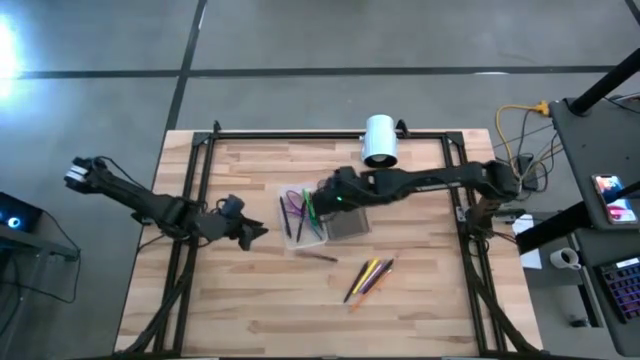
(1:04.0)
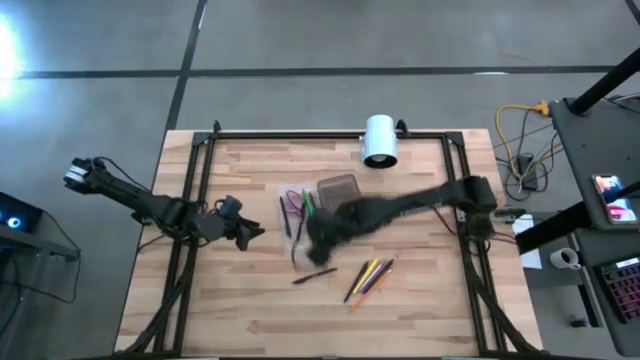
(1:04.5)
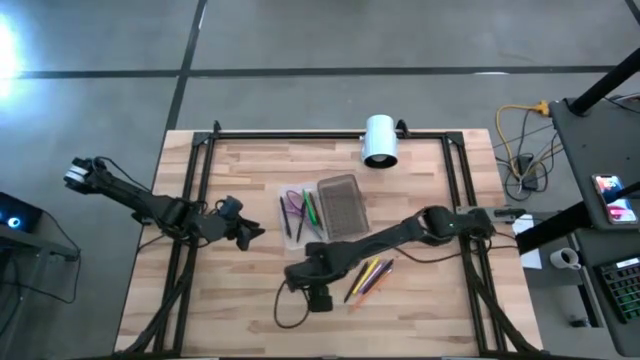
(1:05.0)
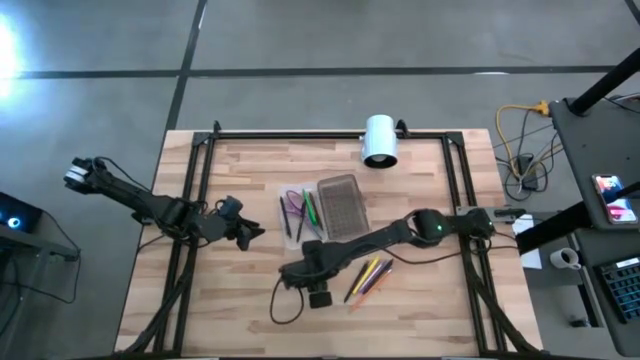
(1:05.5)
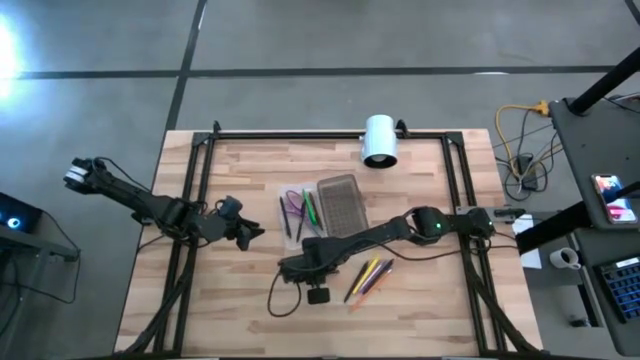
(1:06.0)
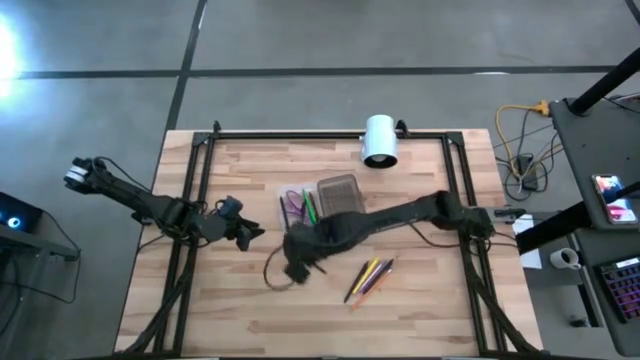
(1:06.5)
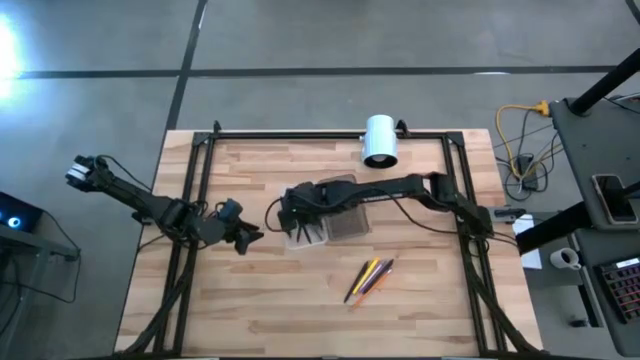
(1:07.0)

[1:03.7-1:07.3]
Task: Pick & place school supplies into a supply box
Put the black pen into the black supply box

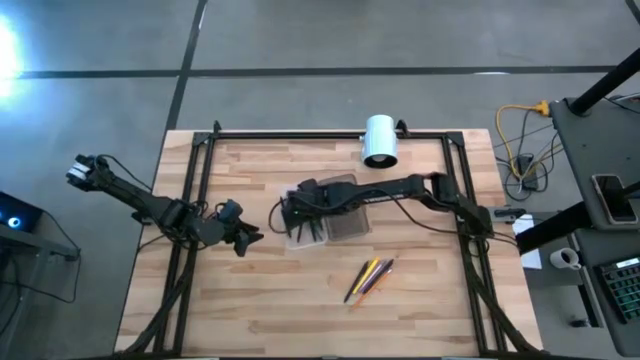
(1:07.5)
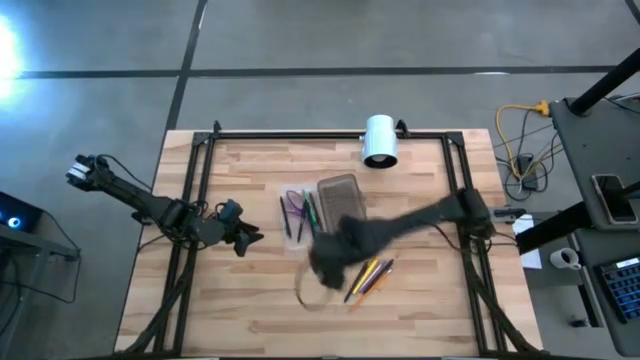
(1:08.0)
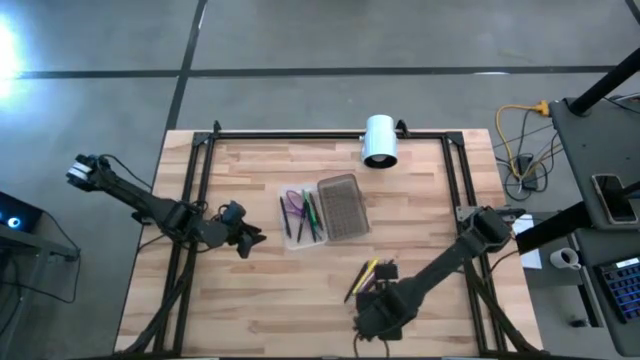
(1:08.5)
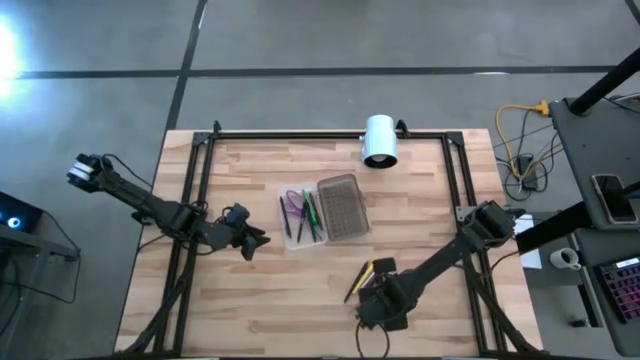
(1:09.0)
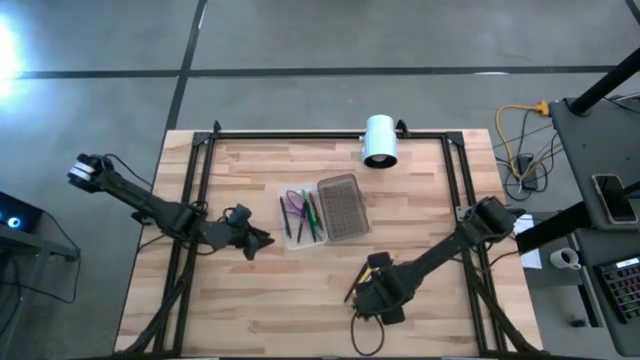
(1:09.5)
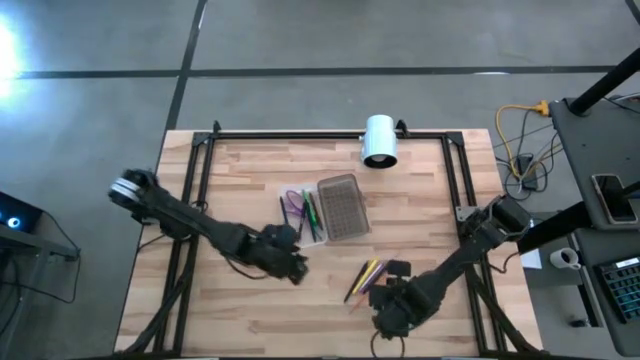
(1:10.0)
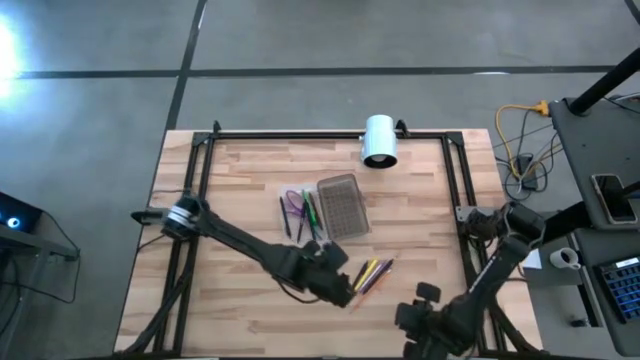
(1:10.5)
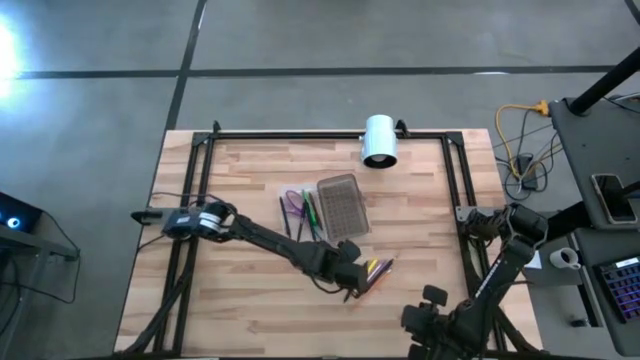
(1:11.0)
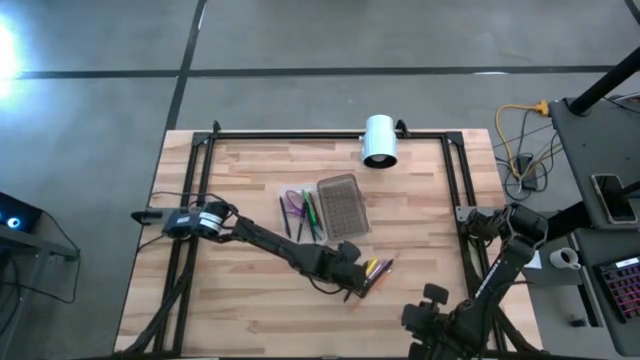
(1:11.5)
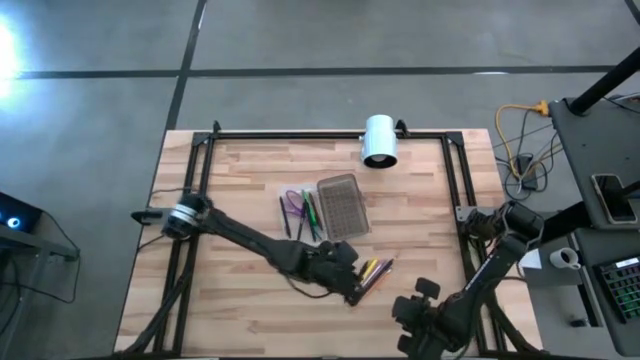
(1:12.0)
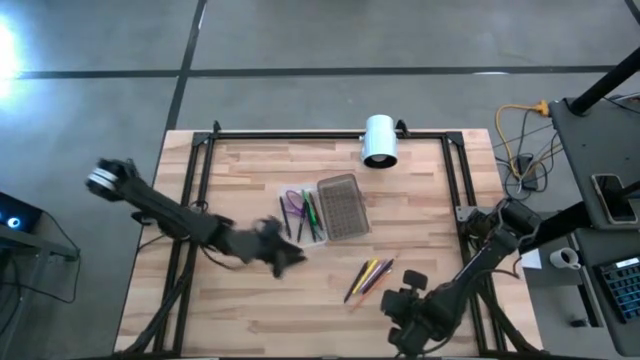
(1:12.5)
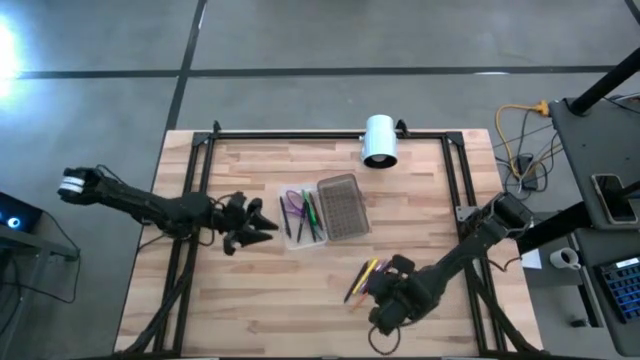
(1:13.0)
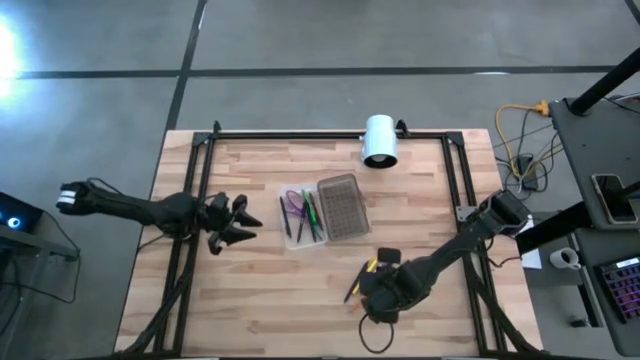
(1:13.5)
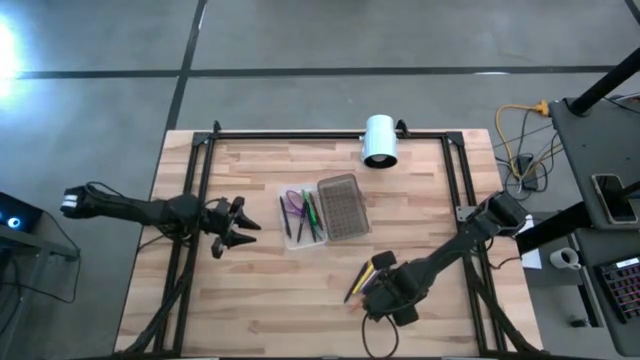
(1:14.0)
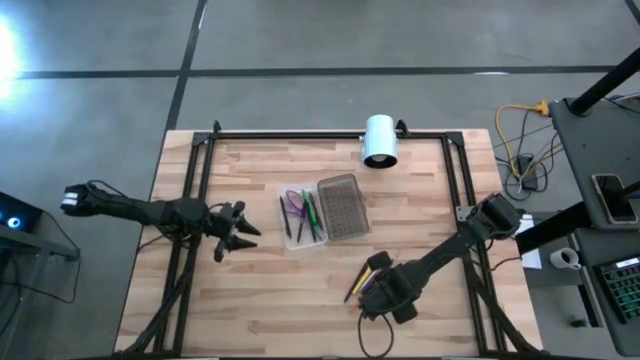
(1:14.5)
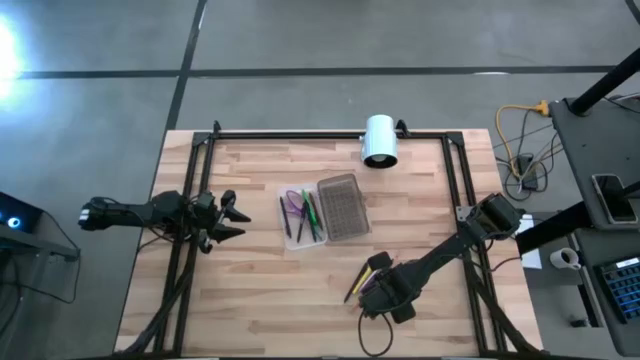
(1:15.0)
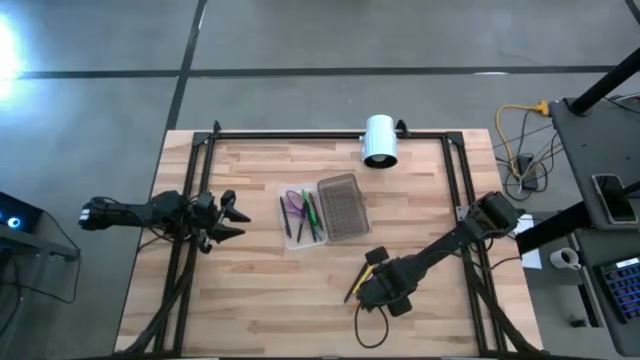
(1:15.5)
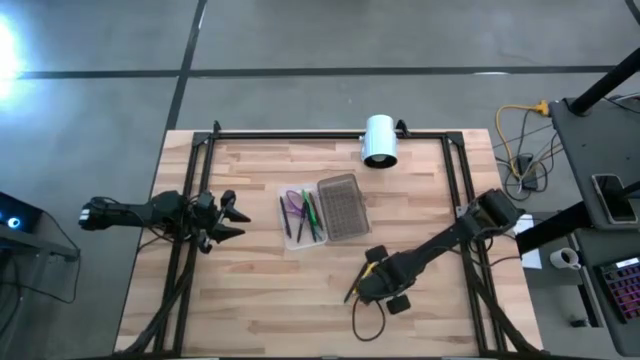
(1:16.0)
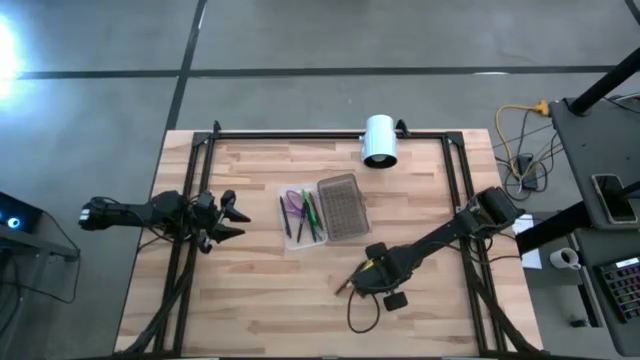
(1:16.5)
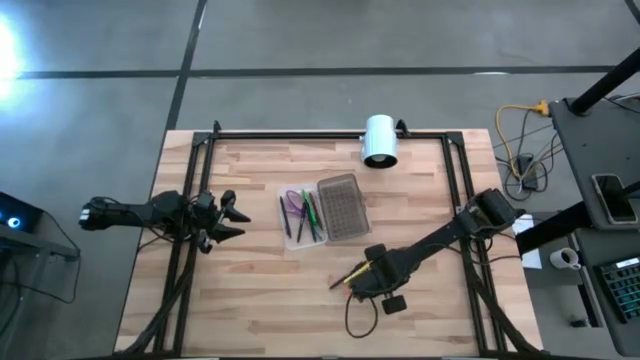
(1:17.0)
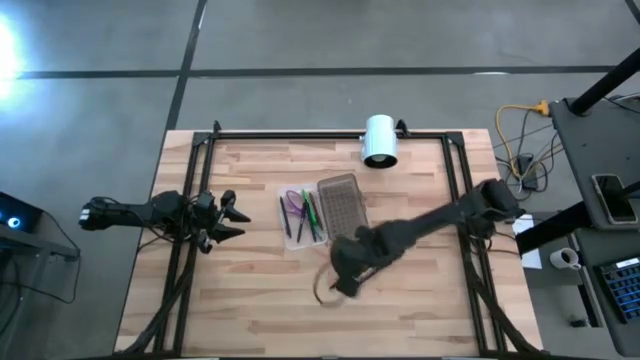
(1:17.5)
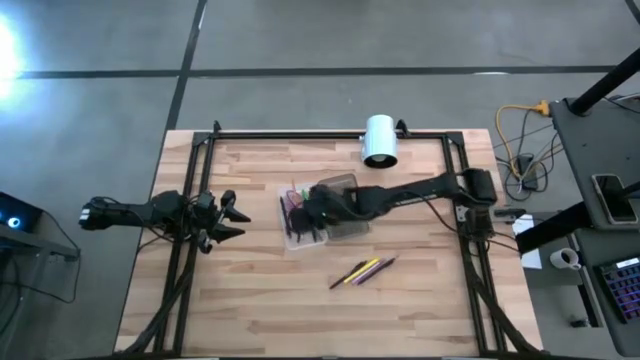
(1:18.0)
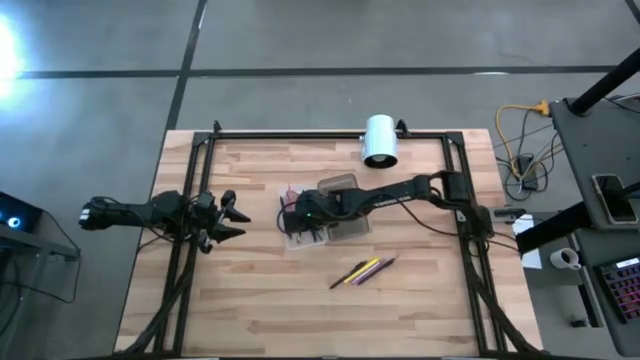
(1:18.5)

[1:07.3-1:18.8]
Put the orange pencil into the black supply box

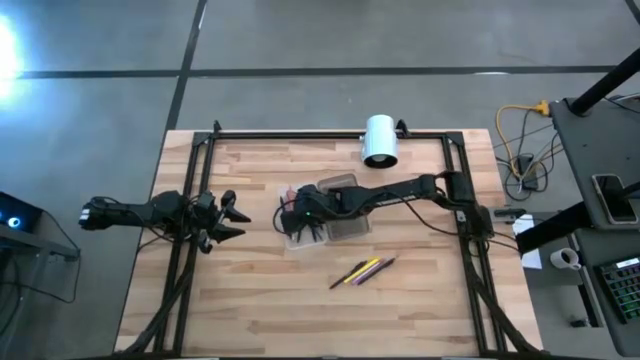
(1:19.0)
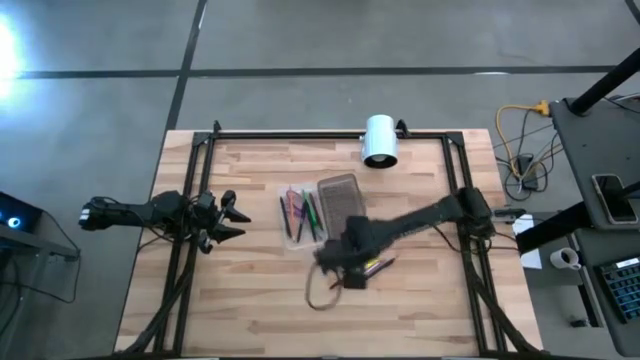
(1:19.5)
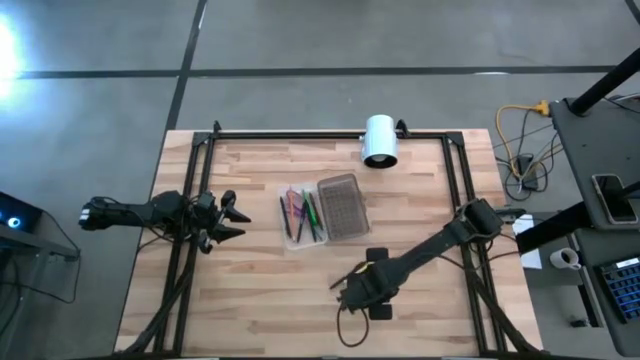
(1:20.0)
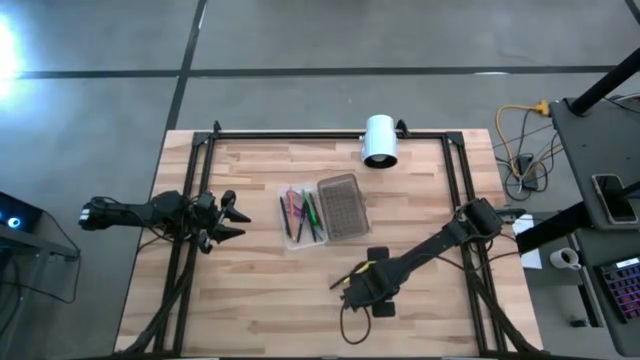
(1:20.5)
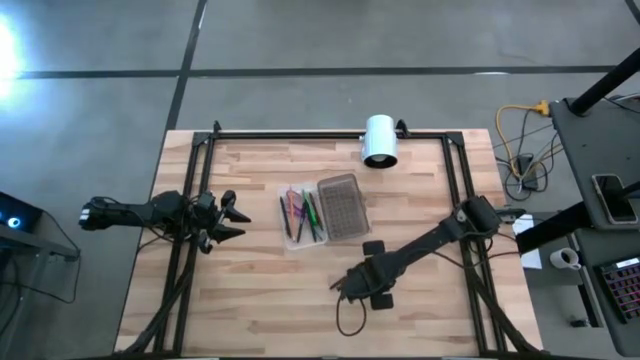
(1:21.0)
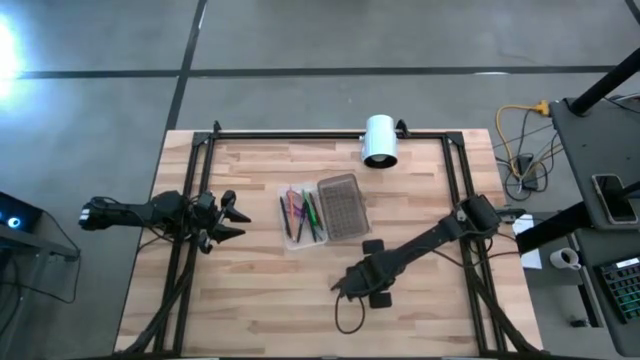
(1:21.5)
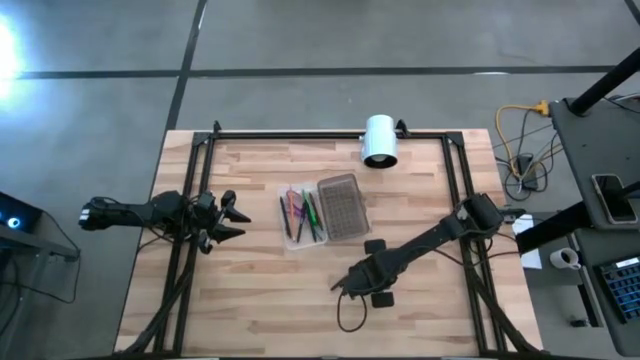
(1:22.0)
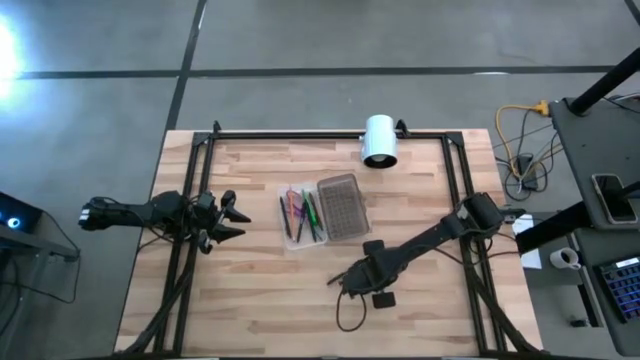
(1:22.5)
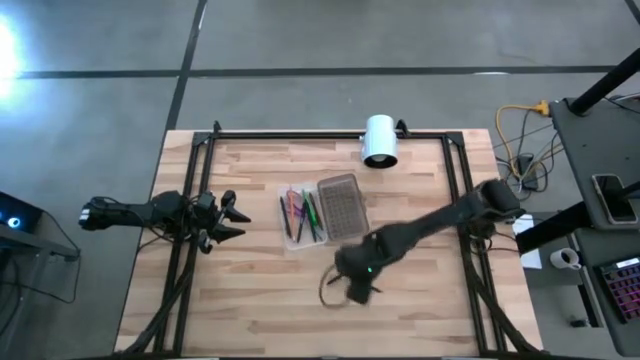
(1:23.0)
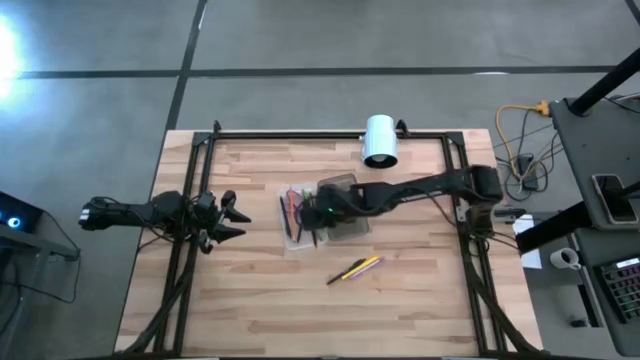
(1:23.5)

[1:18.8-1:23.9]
Put the black pen into the black supply box

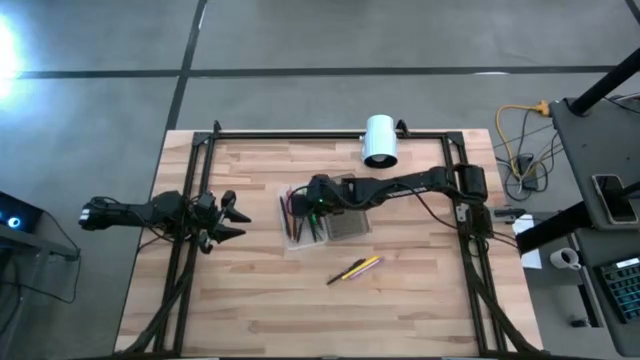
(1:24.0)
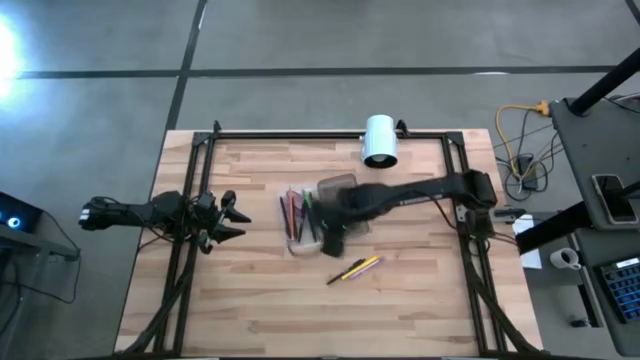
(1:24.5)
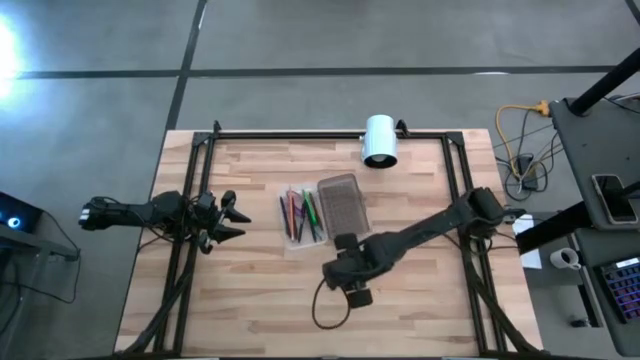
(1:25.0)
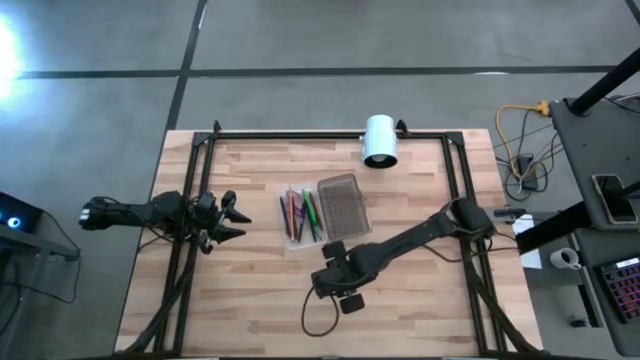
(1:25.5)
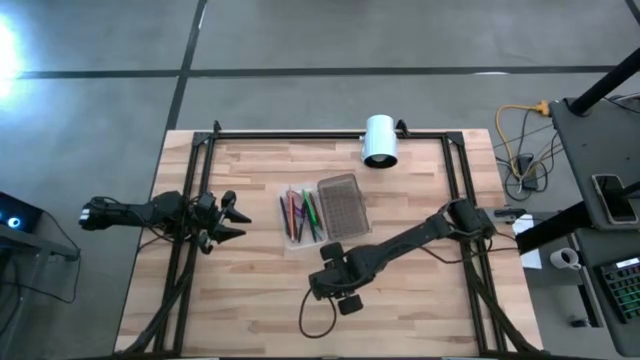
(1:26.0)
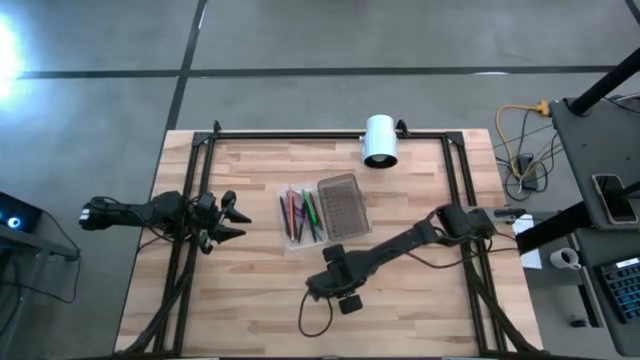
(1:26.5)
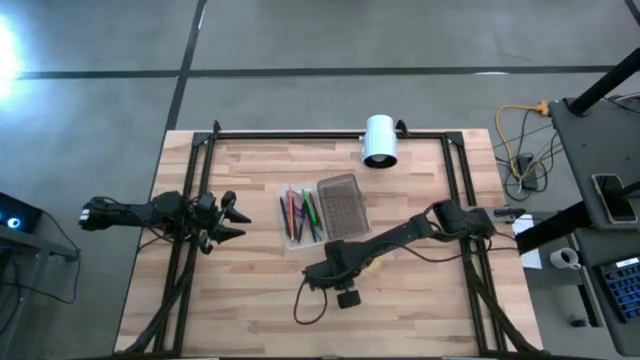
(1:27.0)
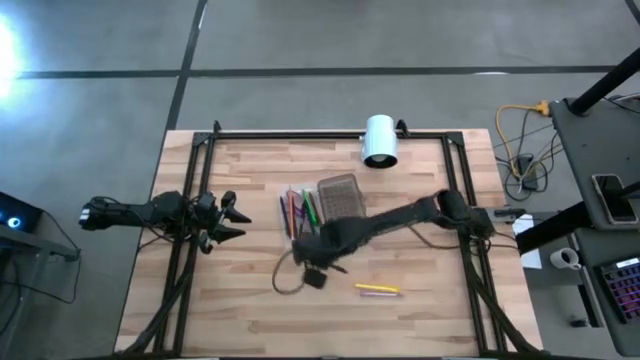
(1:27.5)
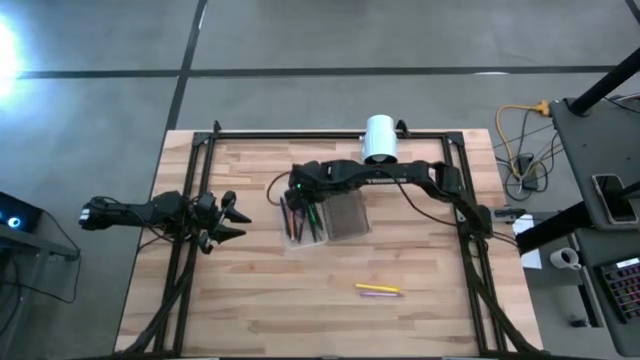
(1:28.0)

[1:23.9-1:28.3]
Put the black pen into the black supply box
